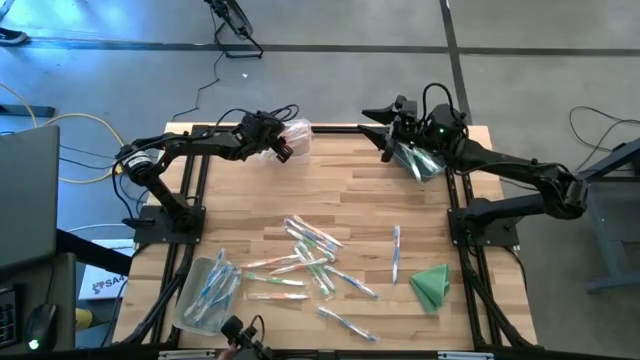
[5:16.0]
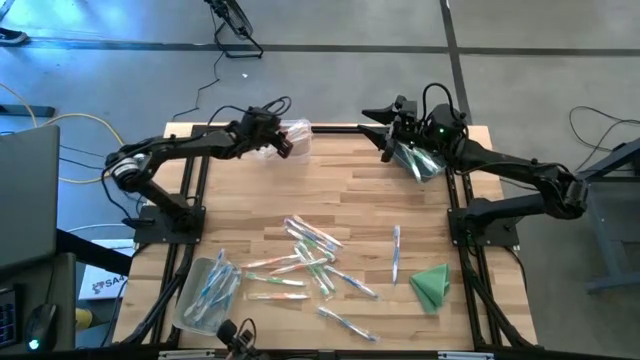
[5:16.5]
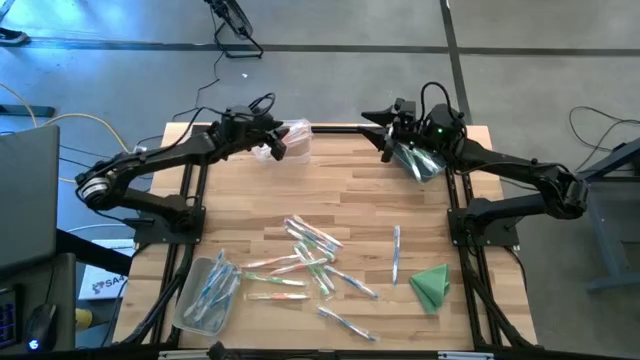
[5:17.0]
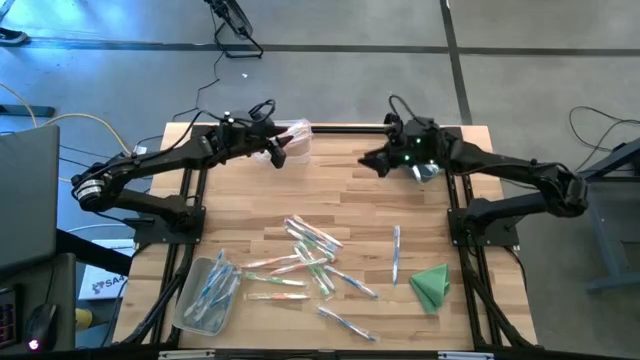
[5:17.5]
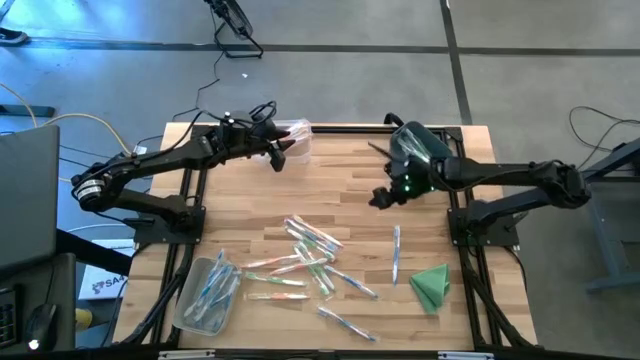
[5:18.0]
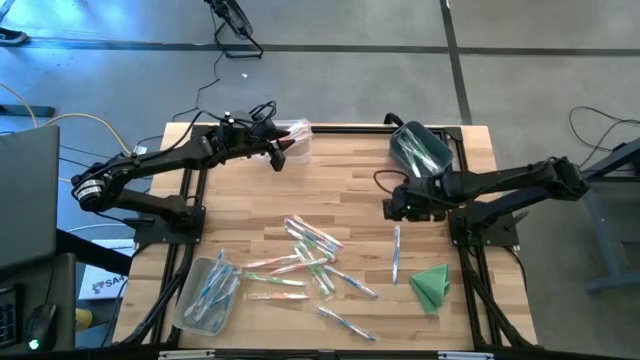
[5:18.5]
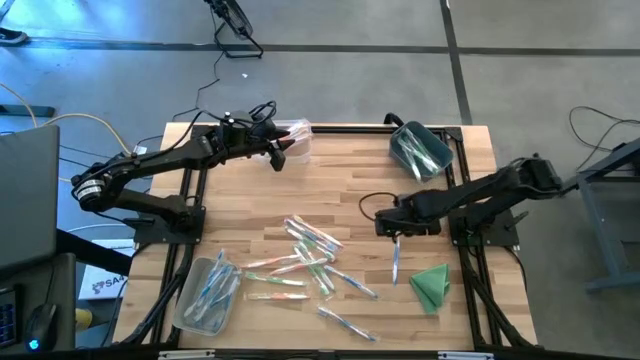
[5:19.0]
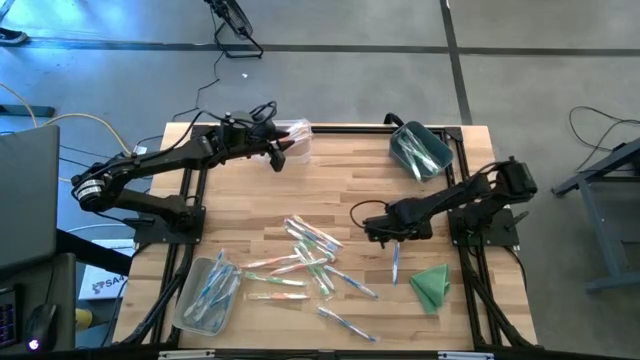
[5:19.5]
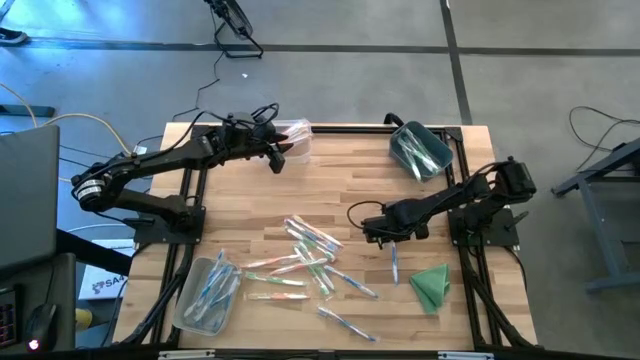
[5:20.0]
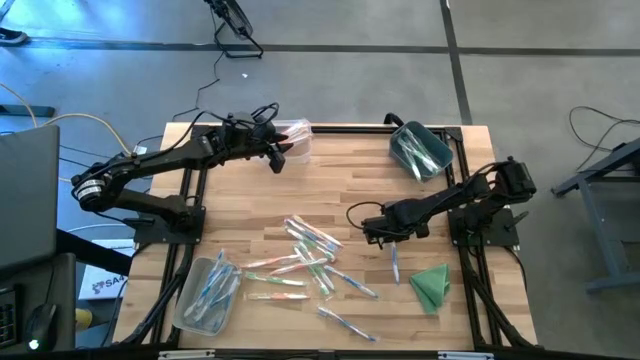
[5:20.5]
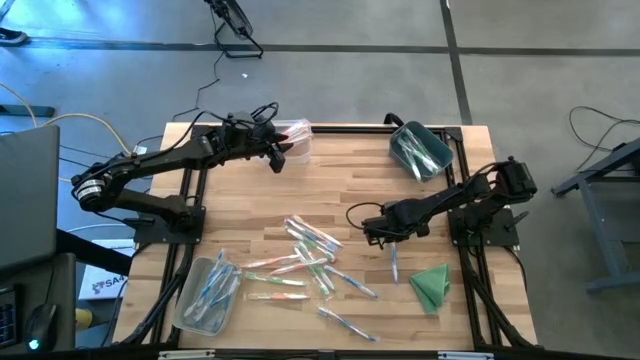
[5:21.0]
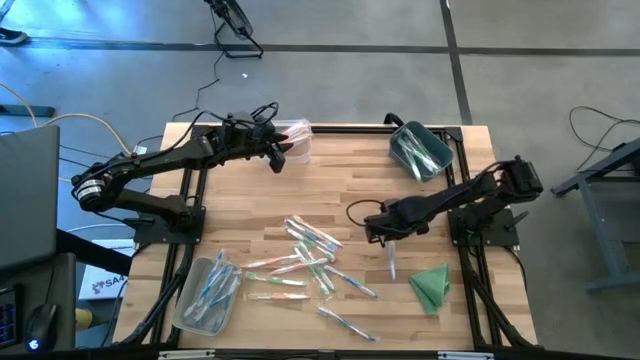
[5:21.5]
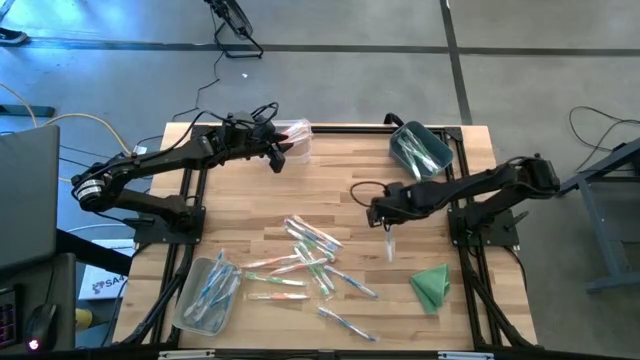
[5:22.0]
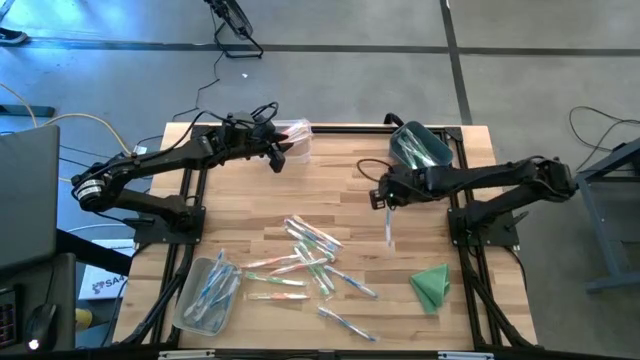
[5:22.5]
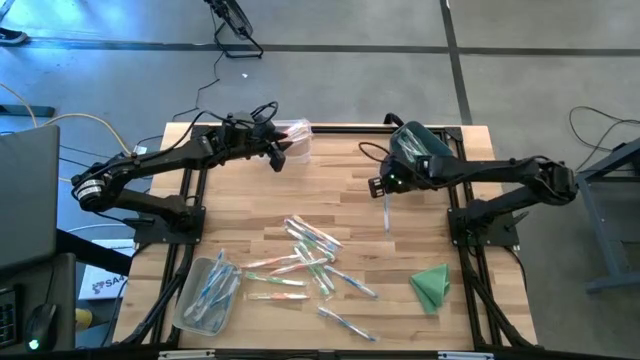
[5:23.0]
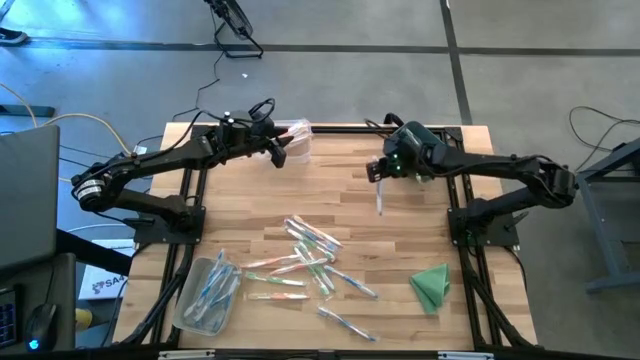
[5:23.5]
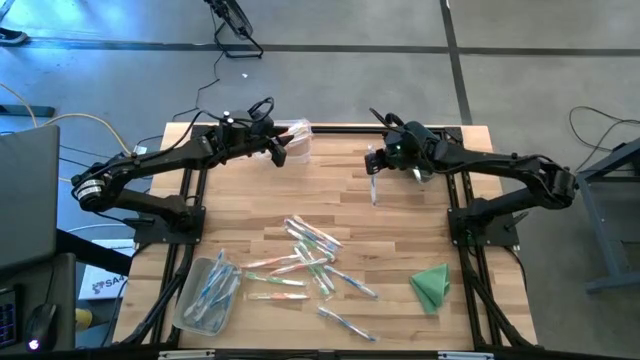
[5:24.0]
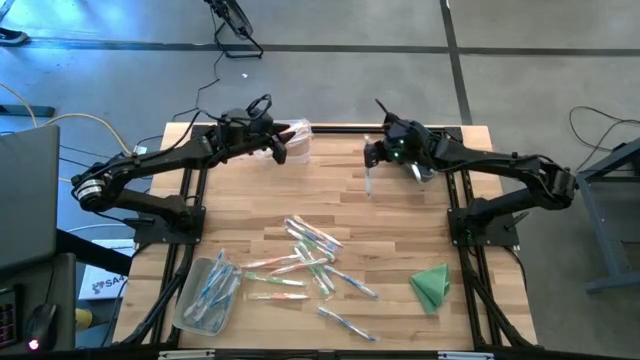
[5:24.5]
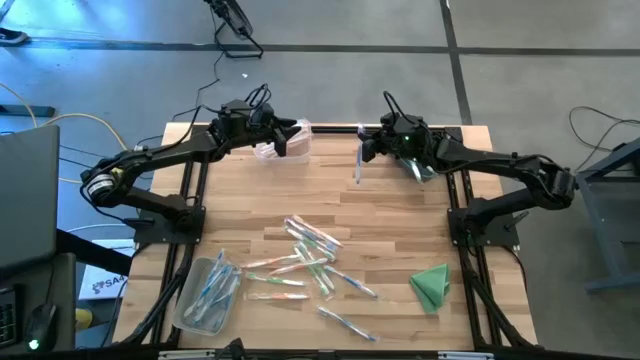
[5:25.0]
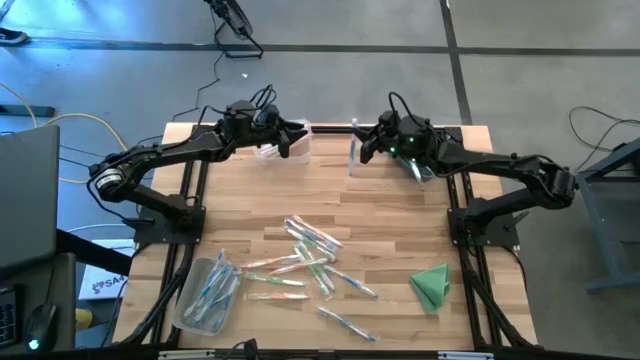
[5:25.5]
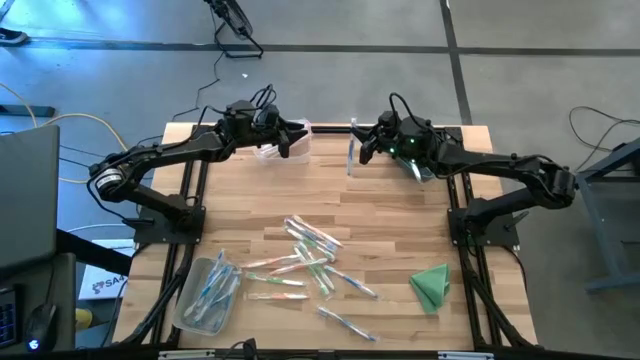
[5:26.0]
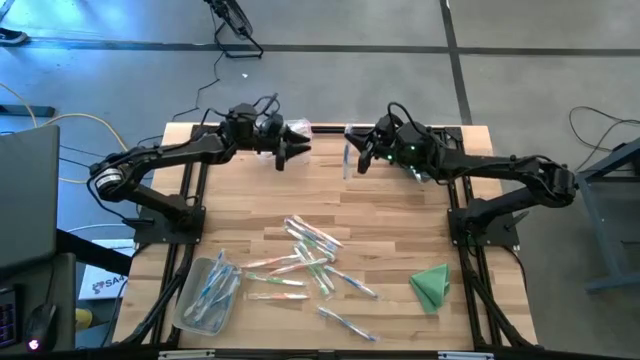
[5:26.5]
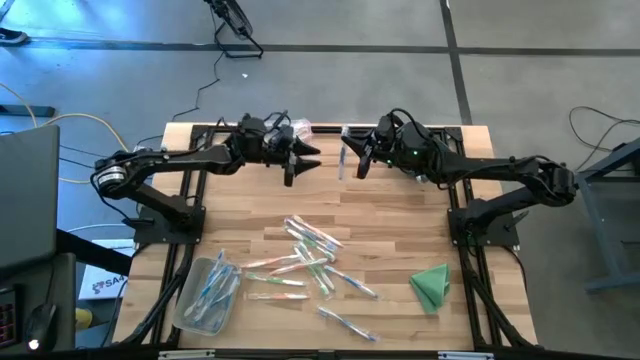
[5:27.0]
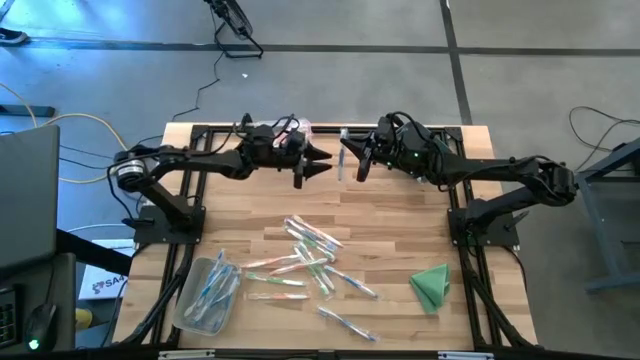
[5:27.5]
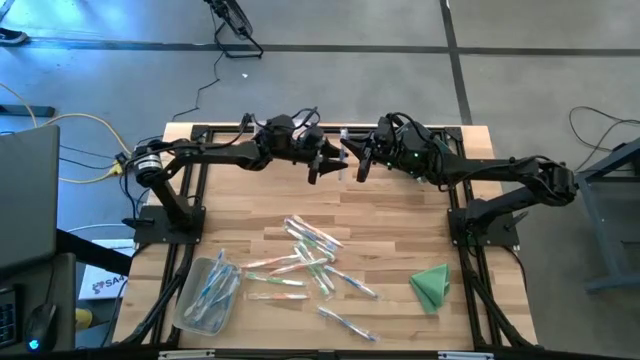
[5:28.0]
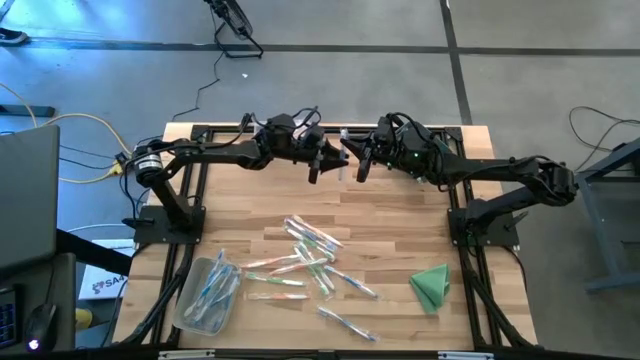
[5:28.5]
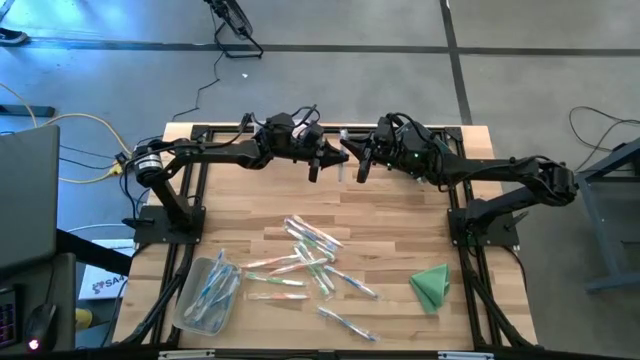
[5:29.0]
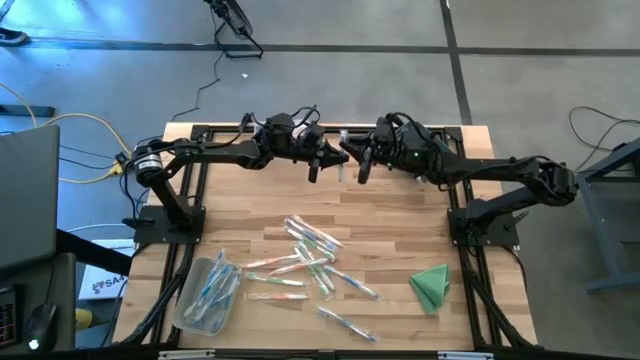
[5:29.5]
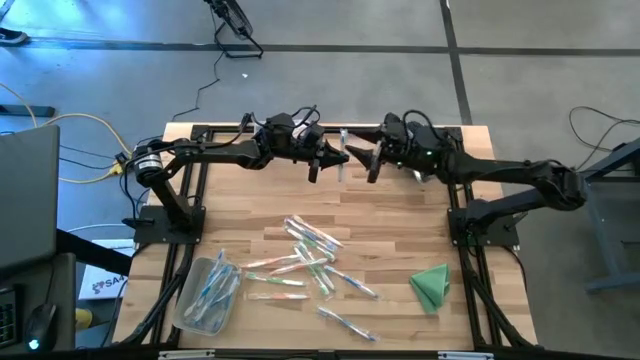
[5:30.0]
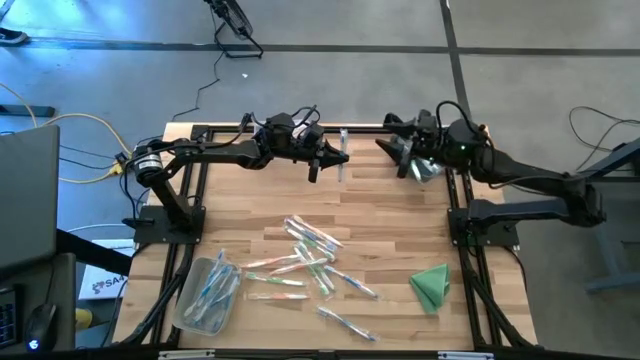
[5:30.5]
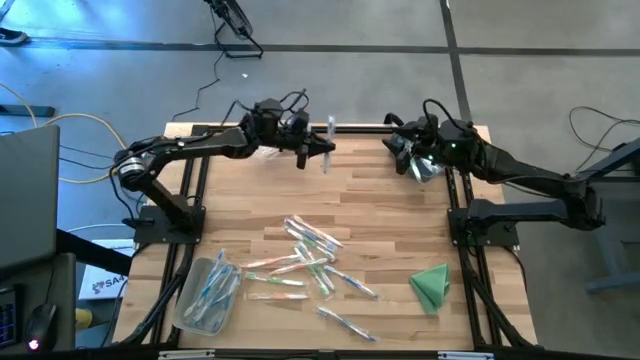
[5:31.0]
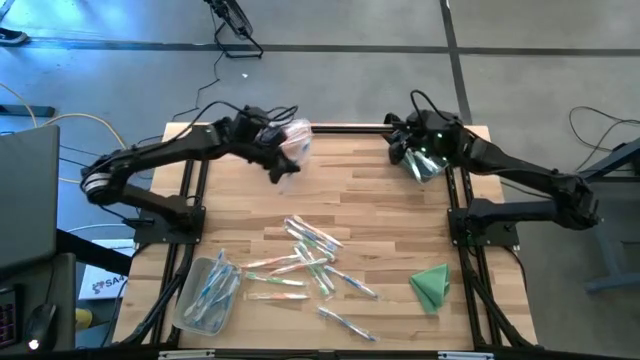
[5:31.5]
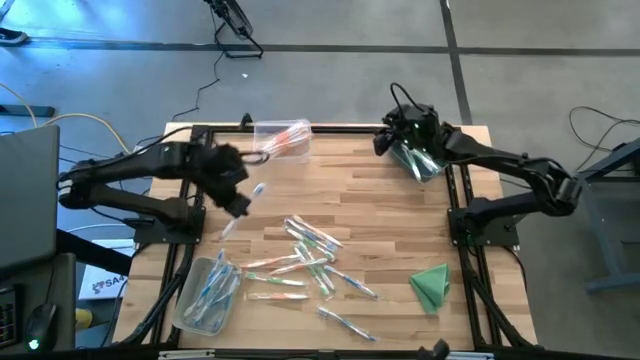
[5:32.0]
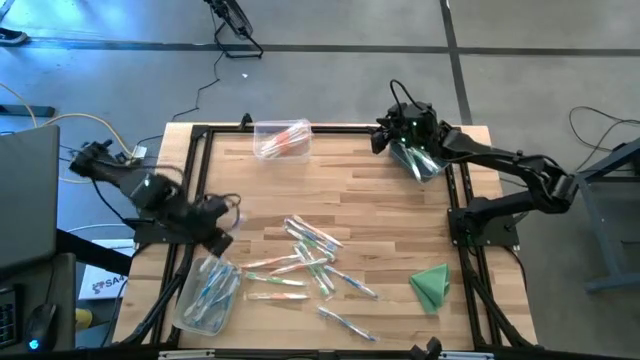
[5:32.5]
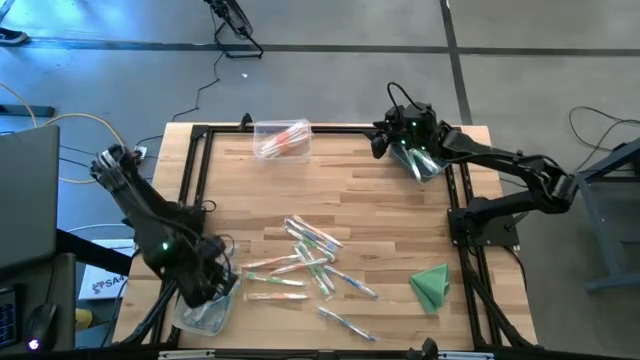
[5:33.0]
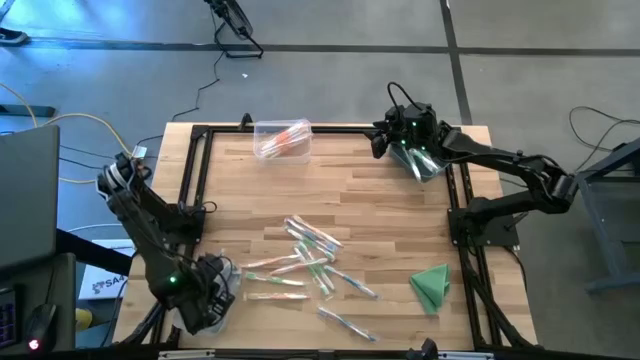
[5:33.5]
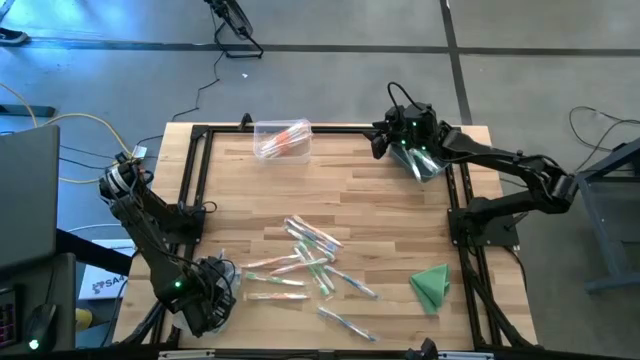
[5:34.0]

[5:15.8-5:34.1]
Task: Pick & Place Toothbrushes
Put the blue toothbrush into the gray bin
